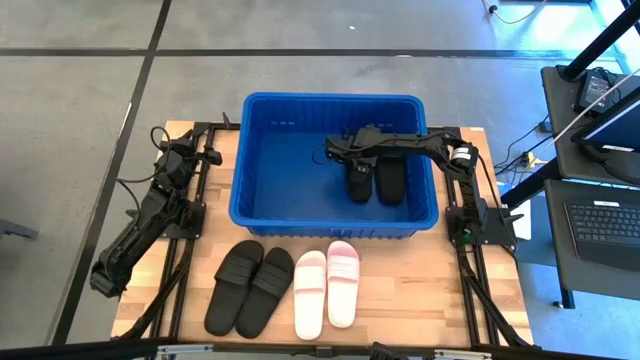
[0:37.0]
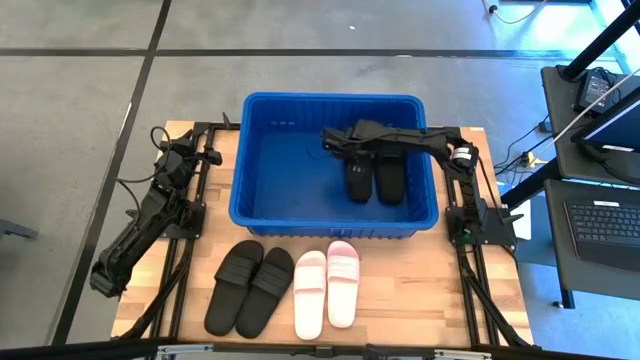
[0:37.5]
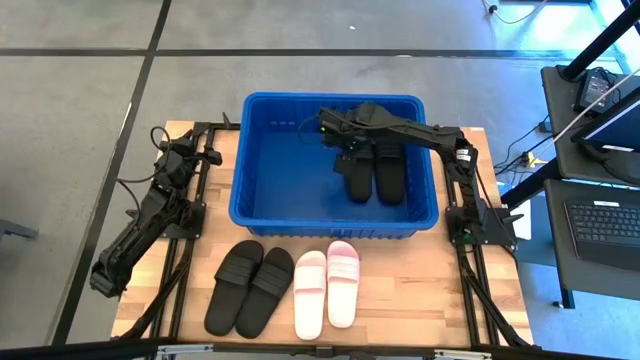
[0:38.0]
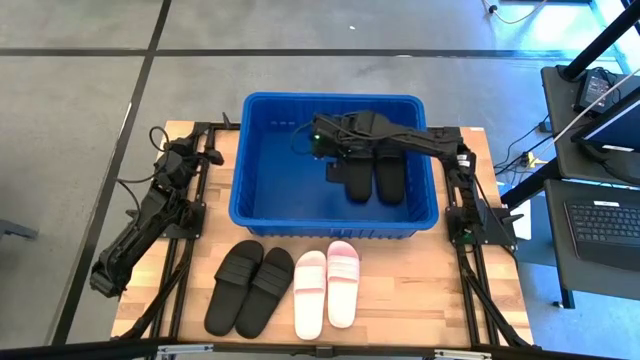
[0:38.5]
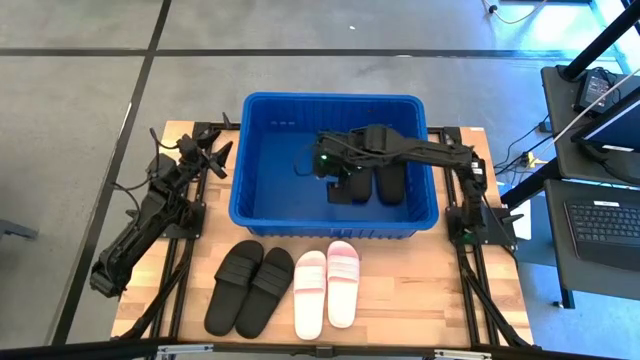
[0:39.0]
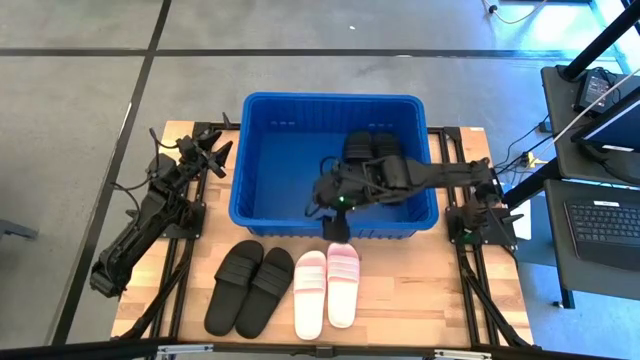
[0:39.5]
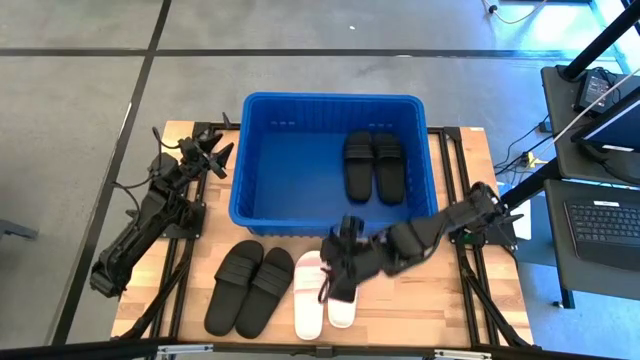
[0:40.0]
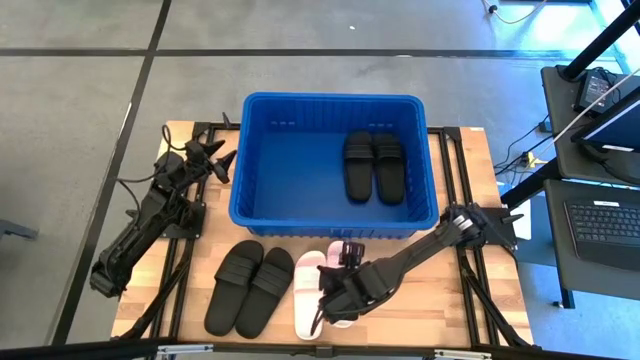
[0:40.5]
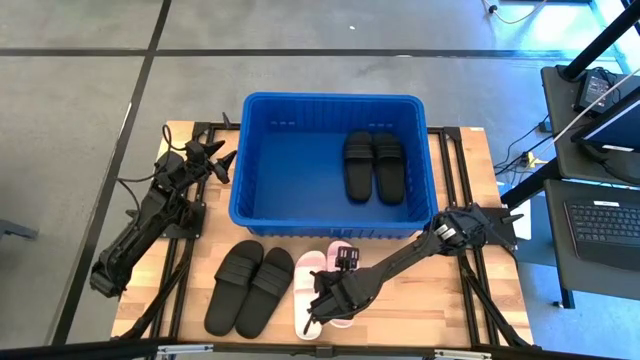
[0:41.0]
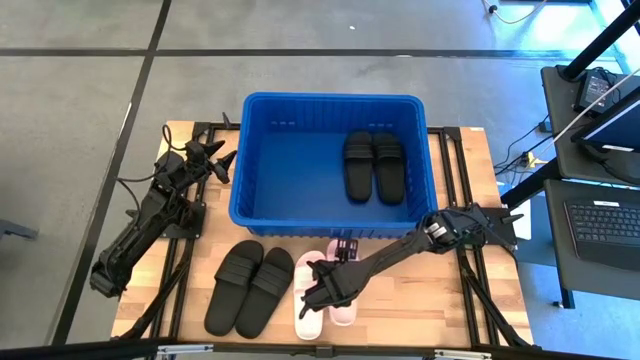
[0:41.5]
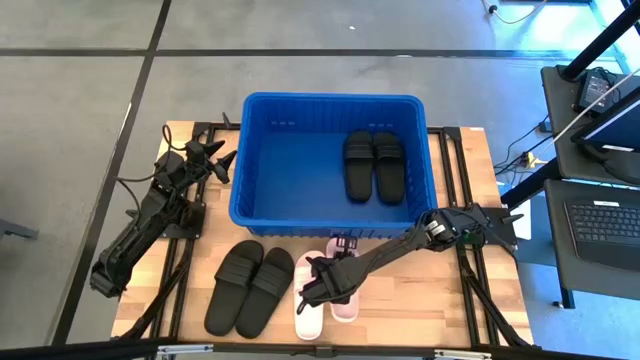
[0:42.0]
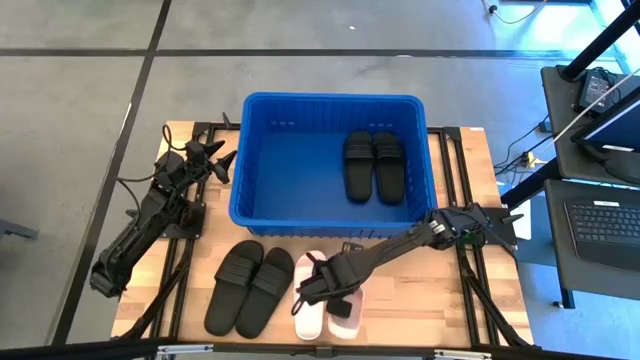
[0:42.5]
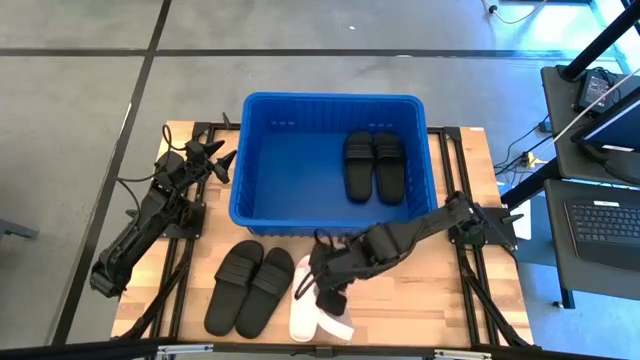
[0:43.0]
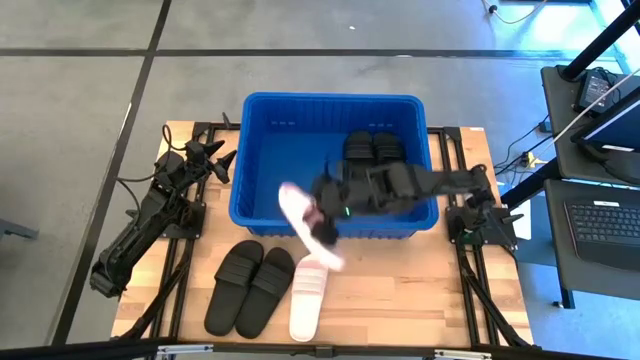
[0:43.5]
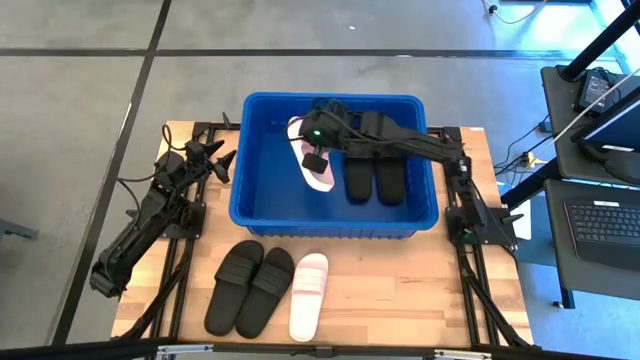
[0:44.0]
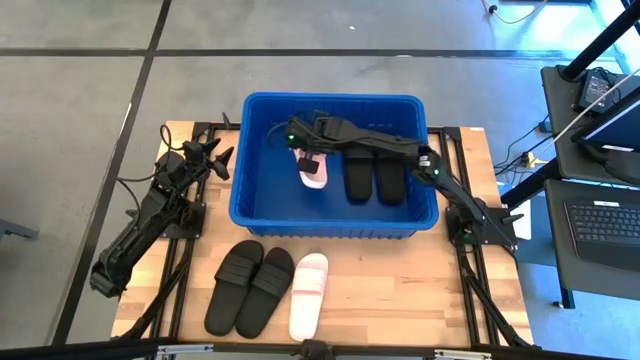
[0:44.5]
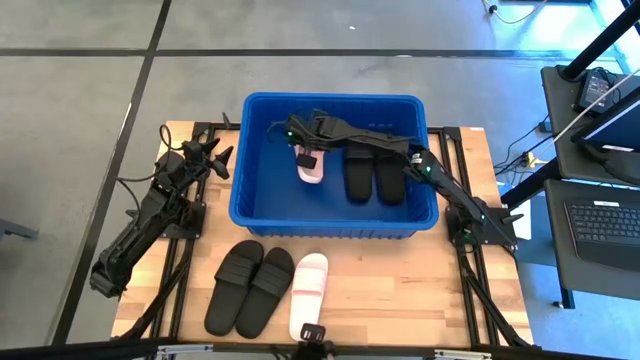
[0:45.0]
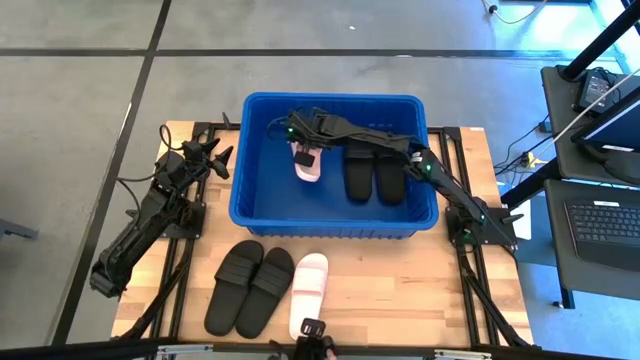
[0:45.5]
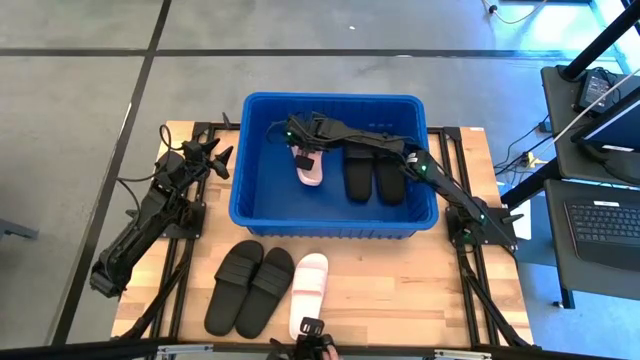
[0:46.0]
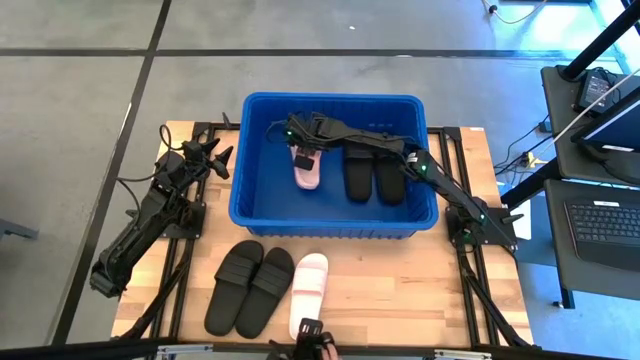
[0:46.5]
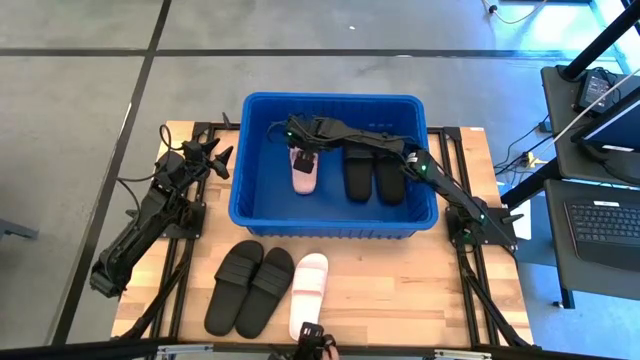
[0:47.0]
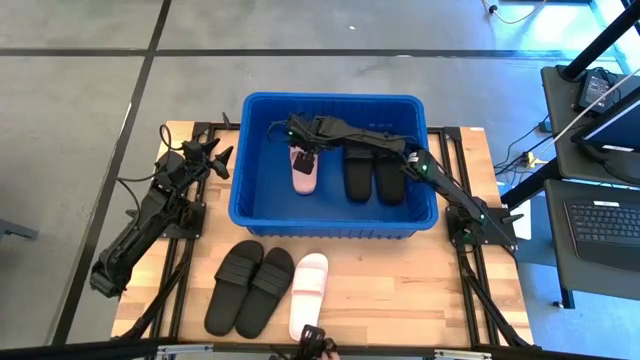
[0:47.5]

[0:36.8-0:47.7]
Task: Pick and place slides into bin
Put the pink slipper into the blue bin

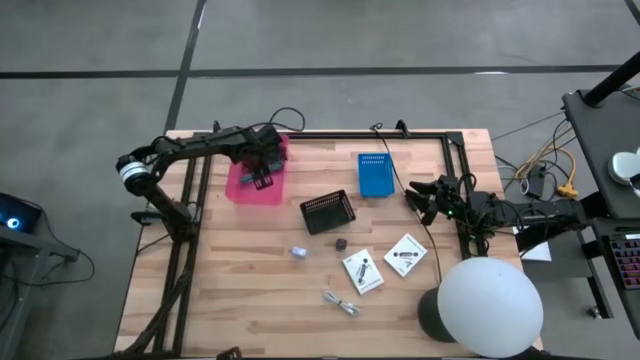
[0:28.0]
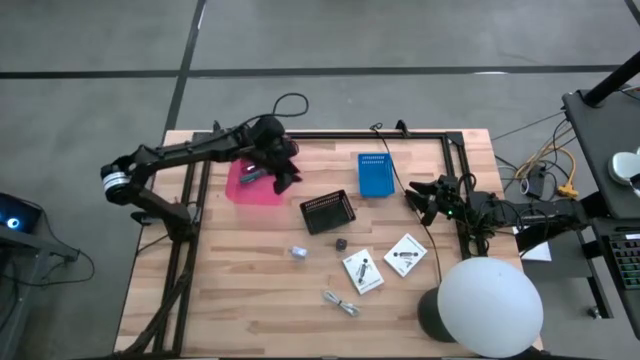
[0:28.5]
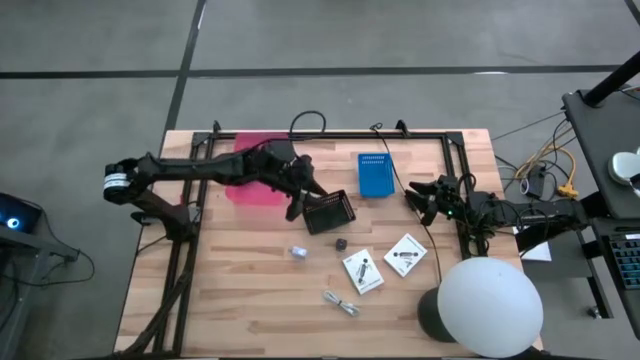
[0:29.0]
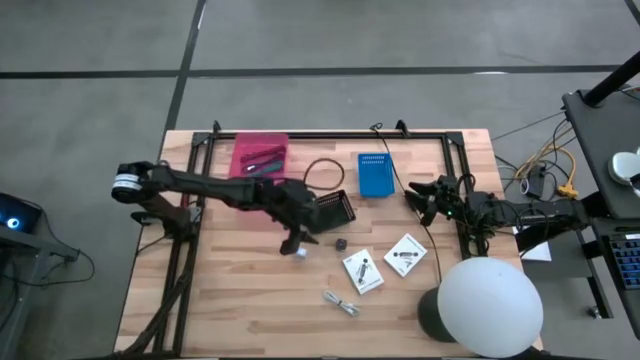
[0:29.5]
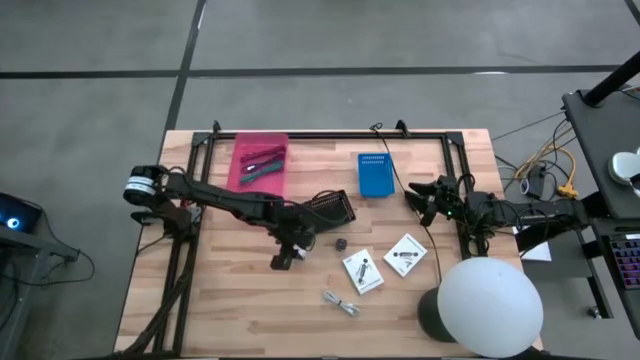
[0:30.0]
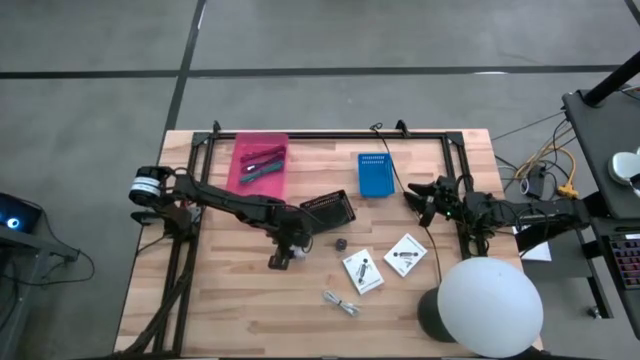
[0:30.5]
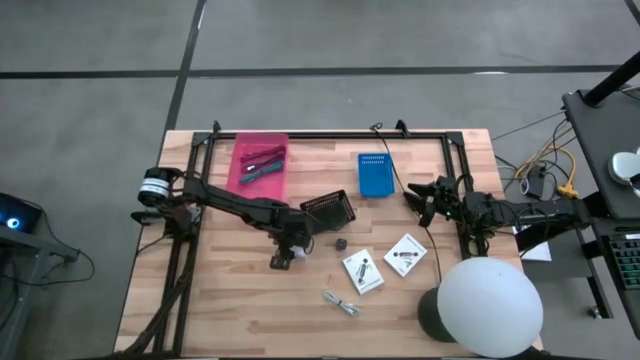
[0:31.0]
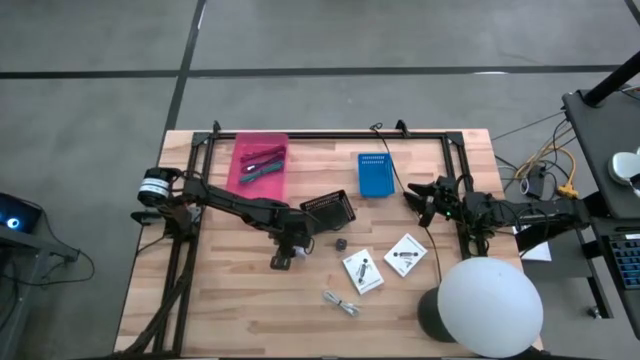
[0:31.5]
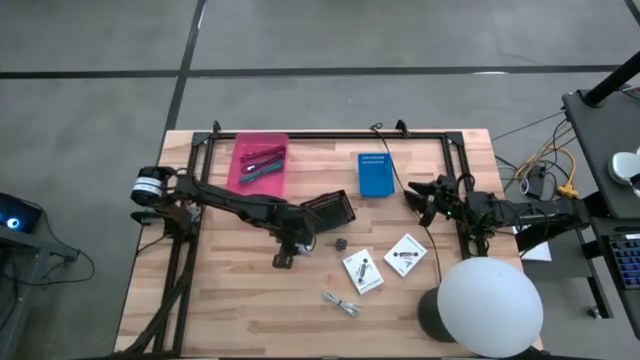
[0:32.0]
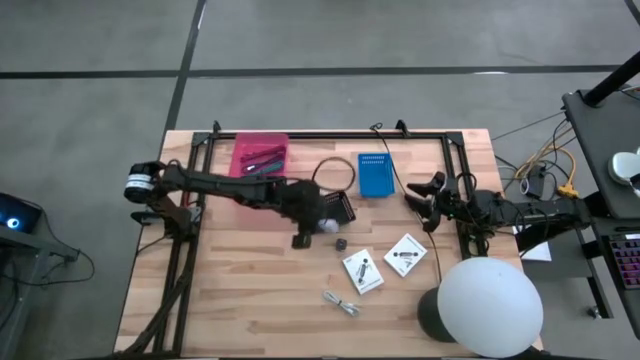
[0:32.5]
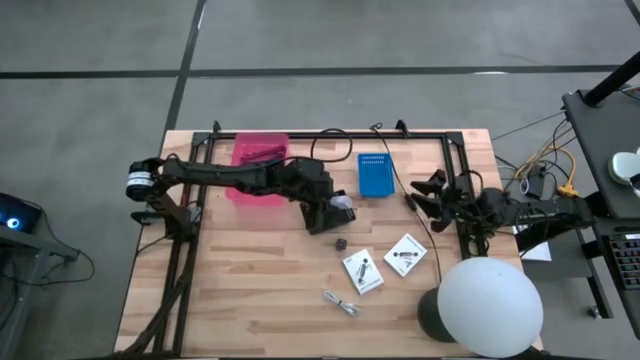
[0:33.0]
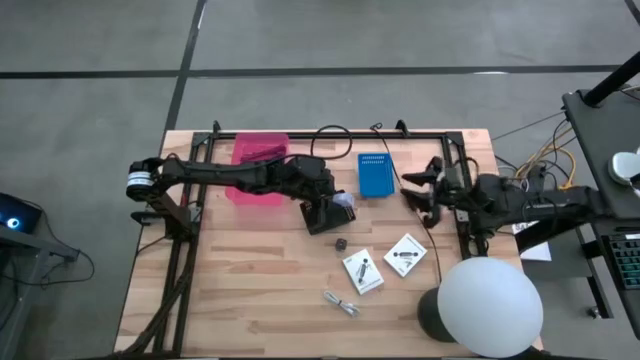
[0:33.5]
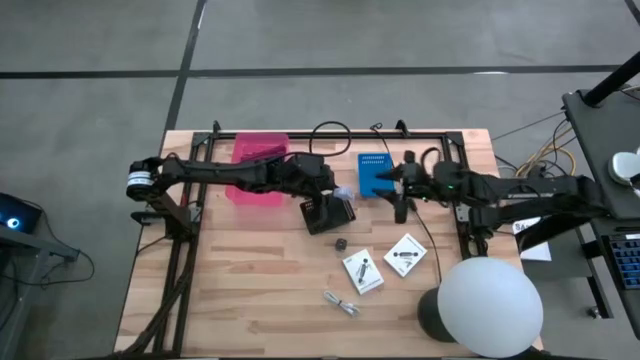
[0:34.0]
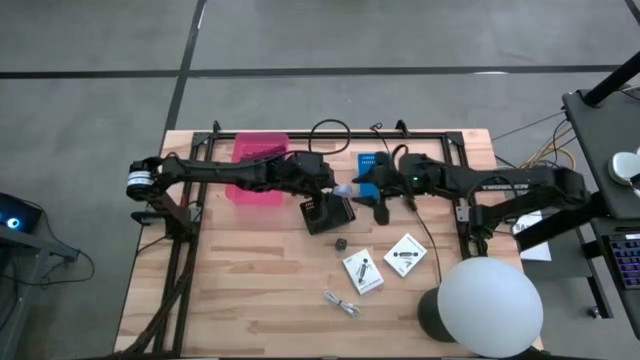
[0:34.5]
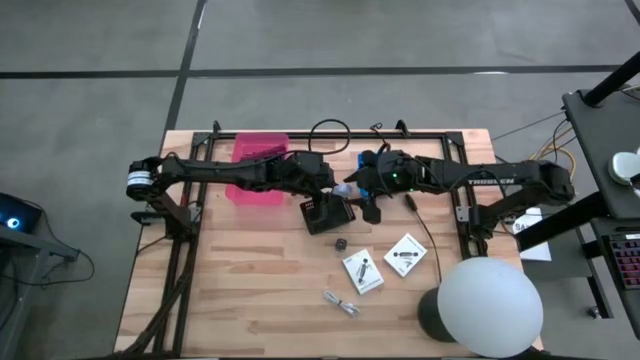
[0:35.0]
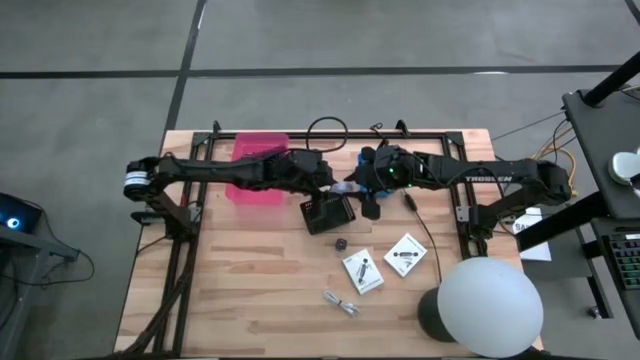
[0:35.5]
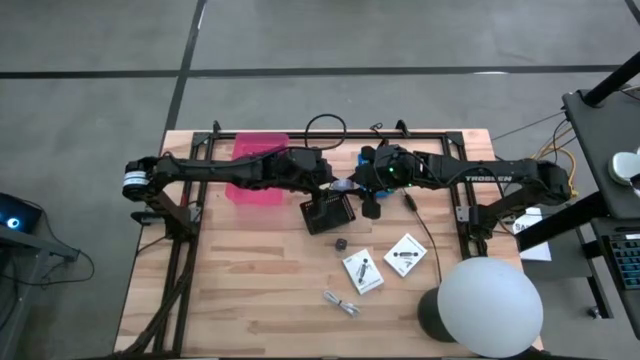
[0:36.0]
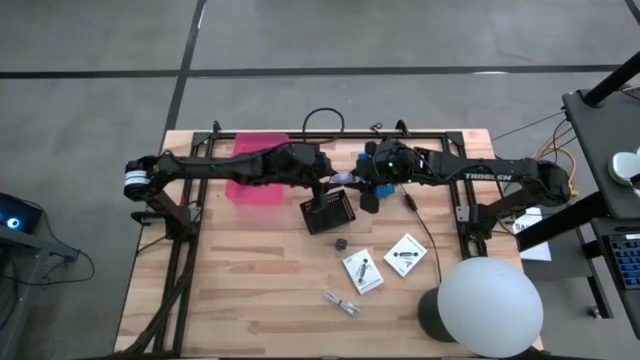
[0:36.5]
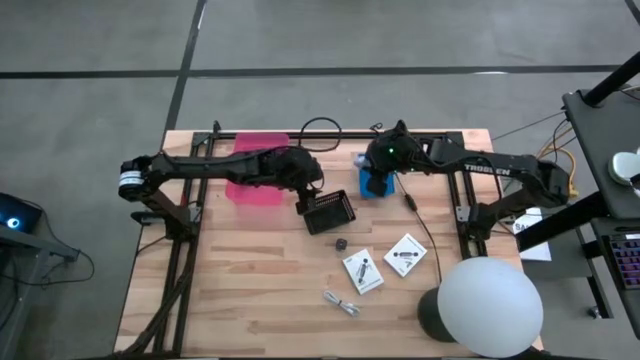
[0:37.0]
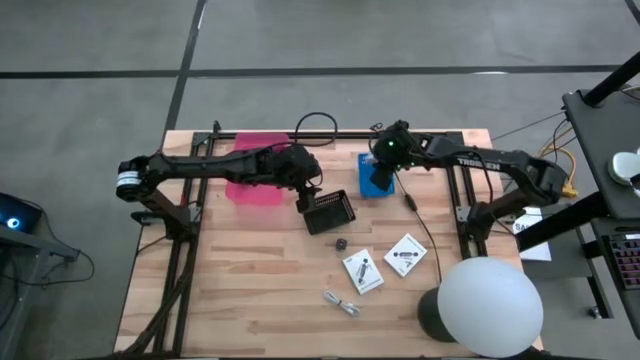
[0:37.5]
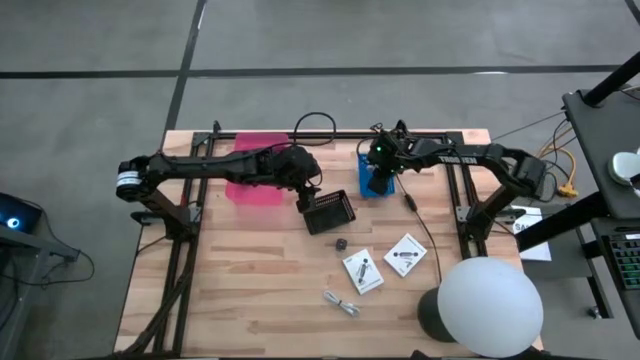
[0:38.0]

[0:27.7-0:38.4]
Task: Pick and place items into bin
Put the blue charger adapter into the blue bin
